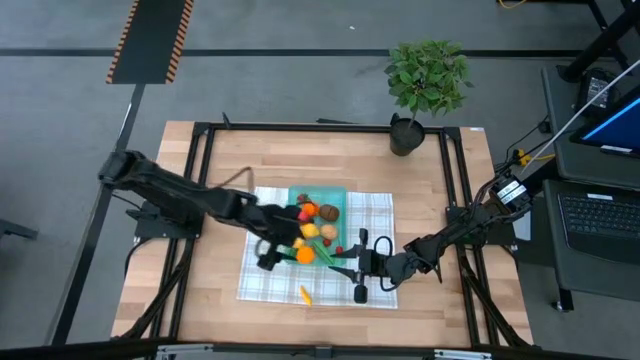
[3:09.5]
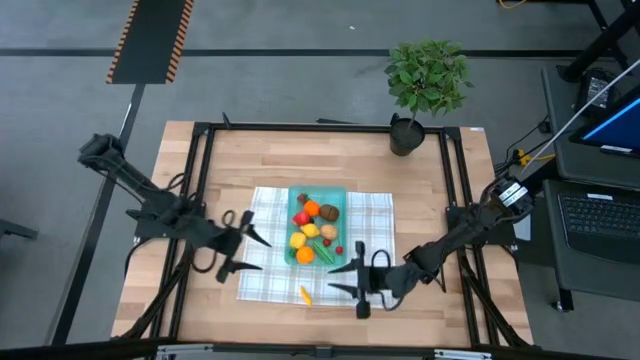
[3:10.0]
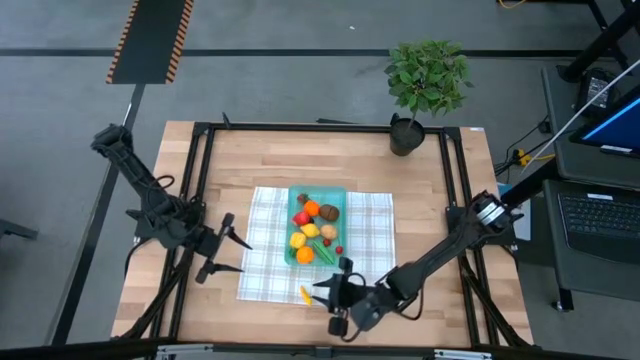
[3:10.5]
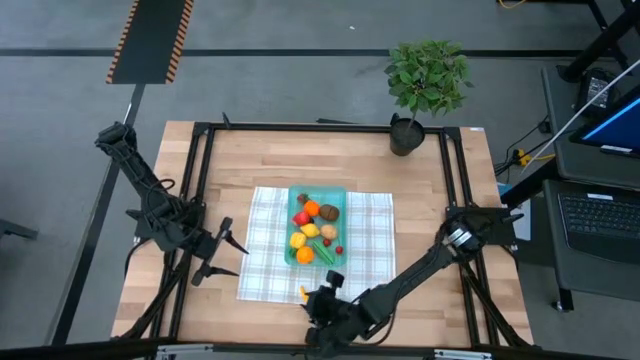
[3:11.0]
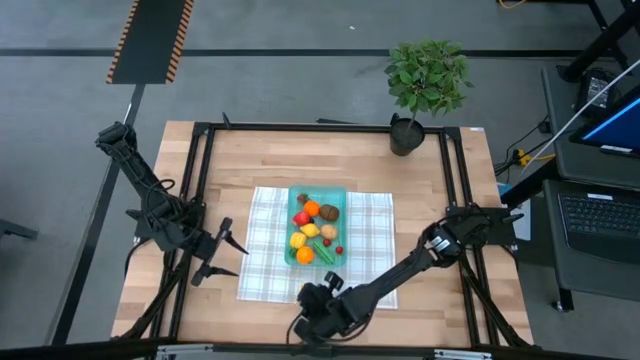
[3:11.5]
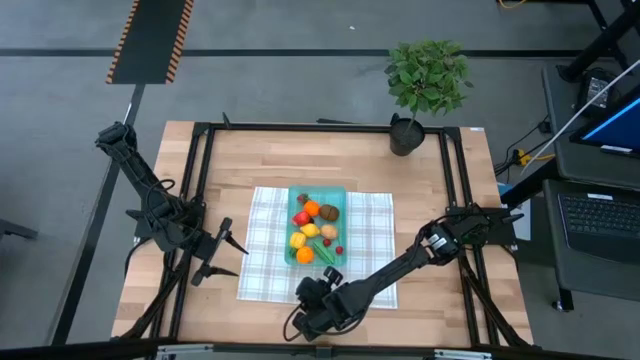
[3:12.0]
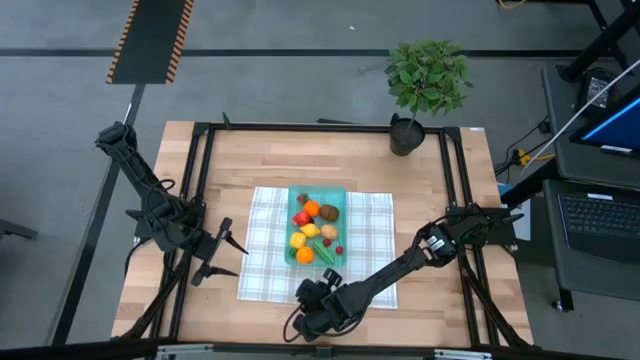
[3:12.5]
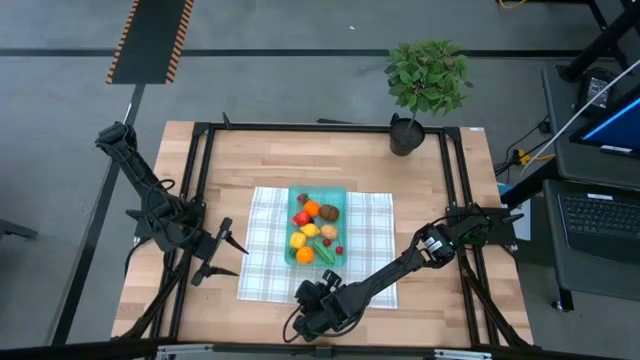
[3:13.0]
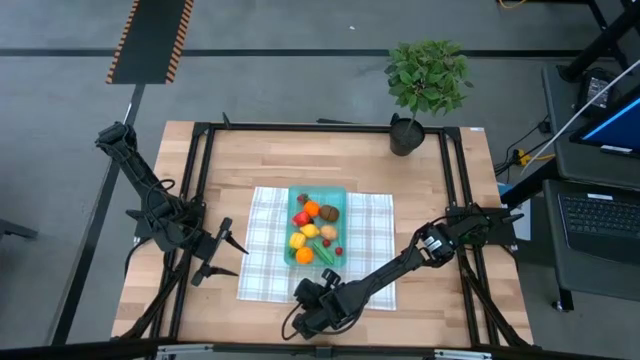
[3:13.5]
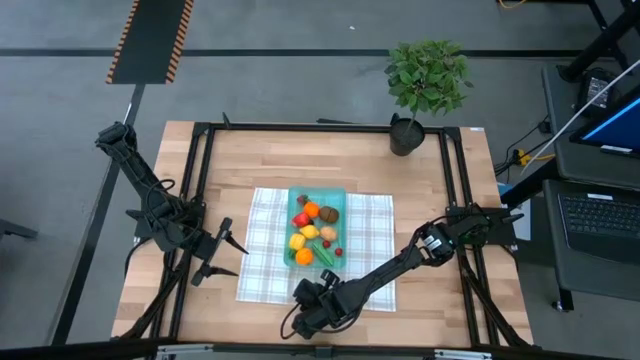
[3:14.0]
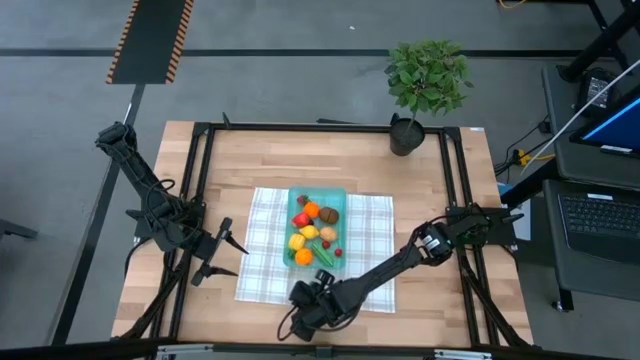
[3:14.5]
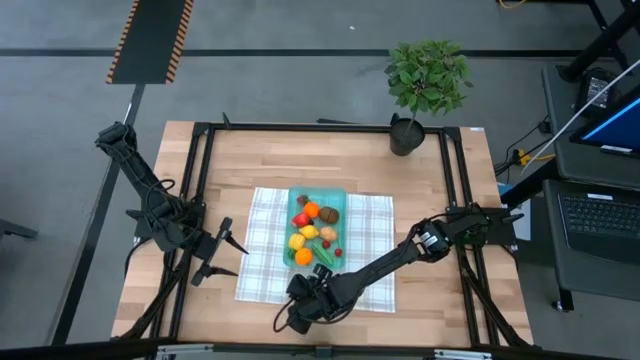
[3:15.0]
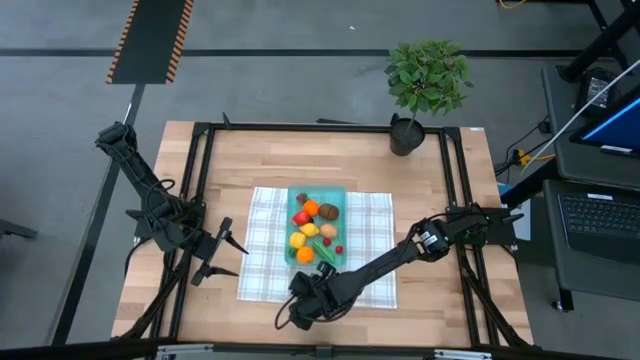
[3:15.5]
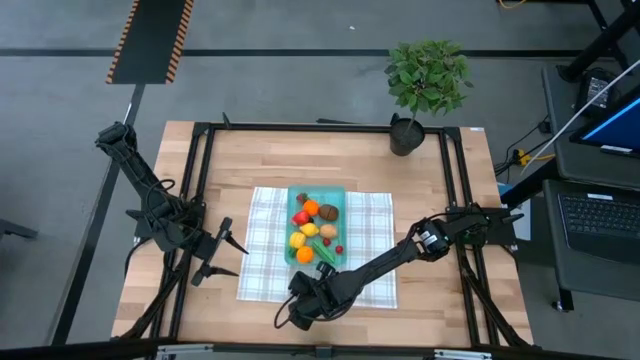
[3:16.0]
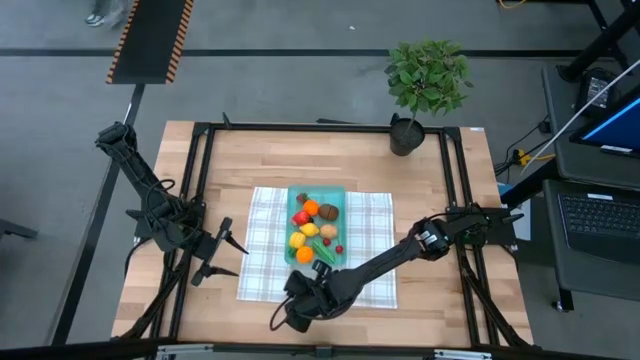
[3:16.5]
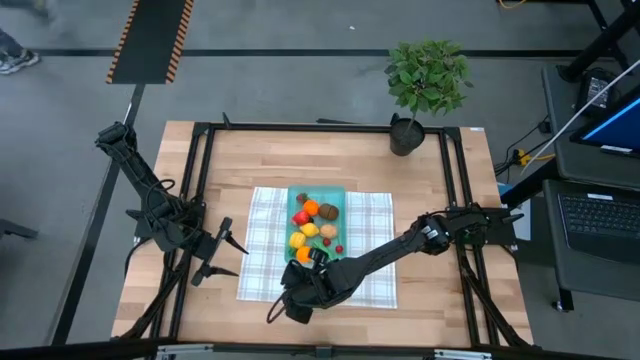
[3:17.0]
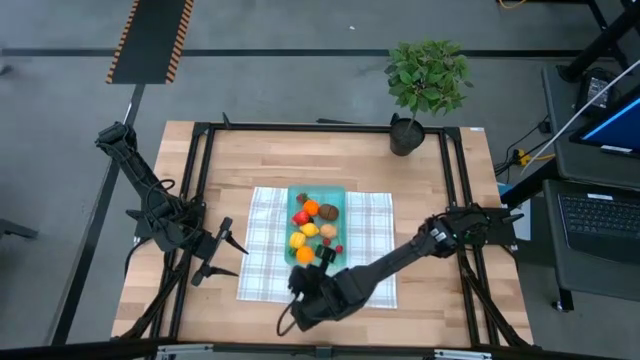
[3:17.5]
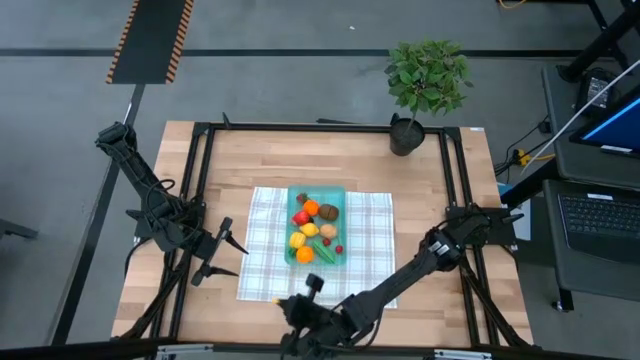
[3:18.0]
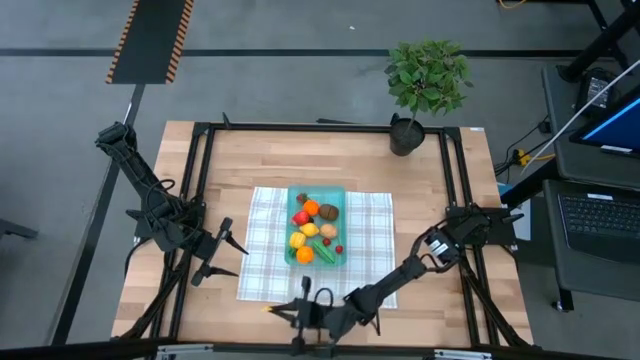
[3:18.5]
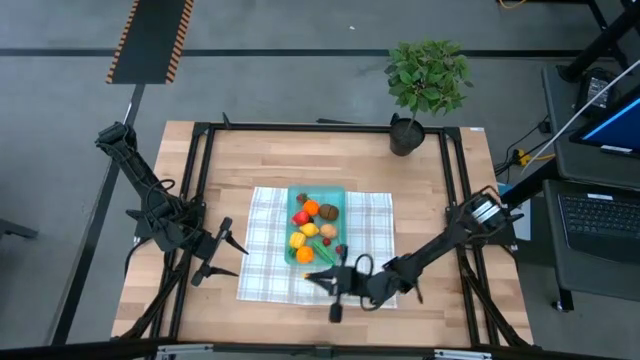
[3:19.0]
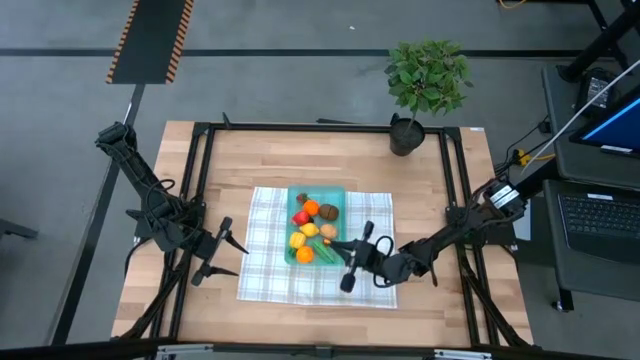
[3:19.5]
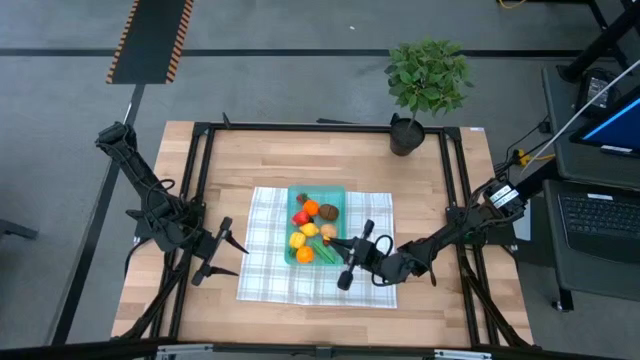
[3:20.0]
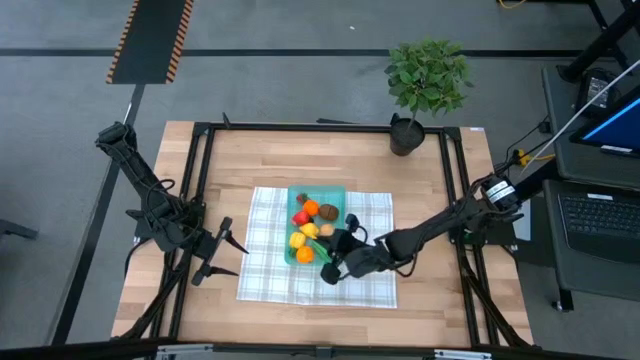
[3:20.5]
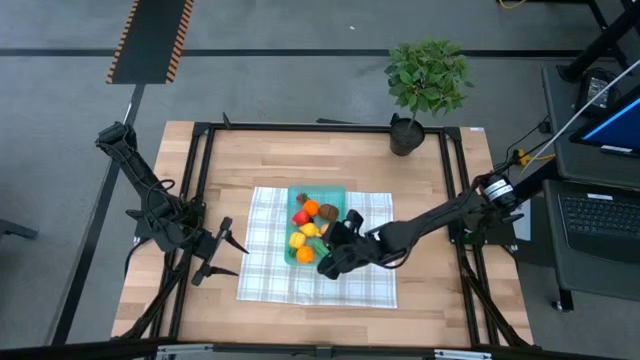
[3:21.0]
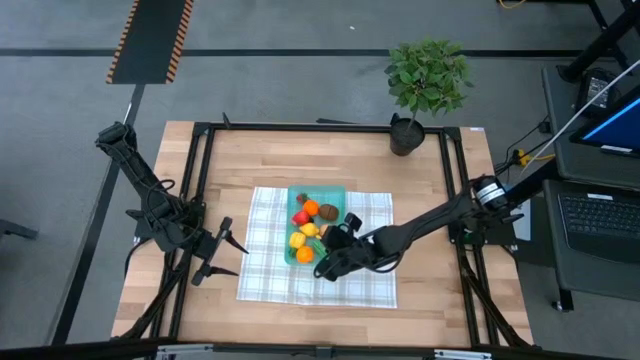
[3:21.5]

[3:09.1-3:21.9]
Task: Pick and placing Produce into tupperware
Put the yellow corn into the blue bin

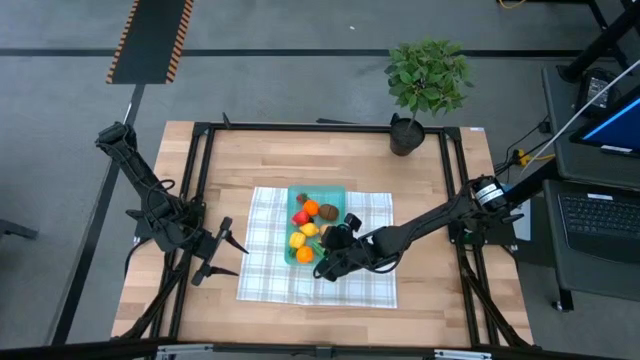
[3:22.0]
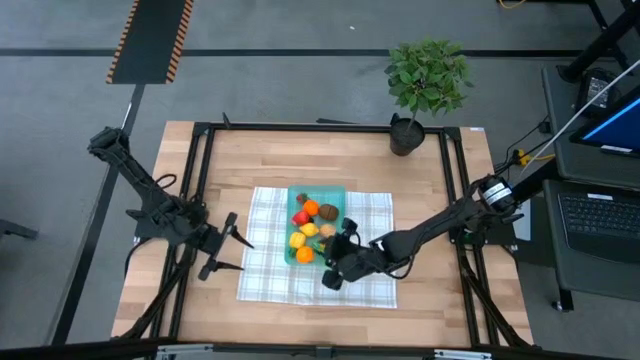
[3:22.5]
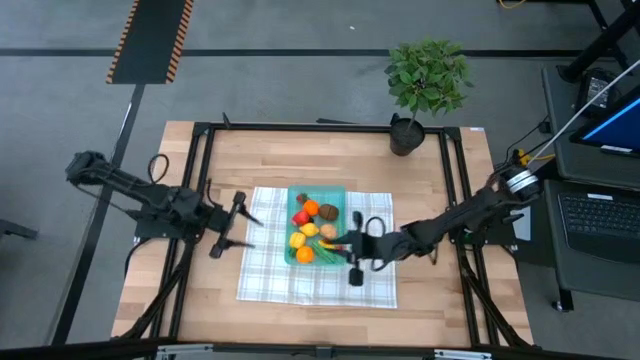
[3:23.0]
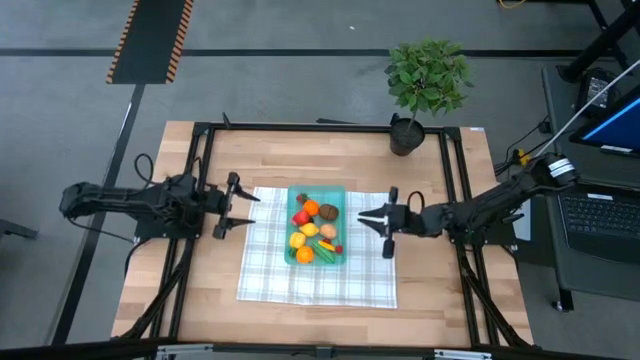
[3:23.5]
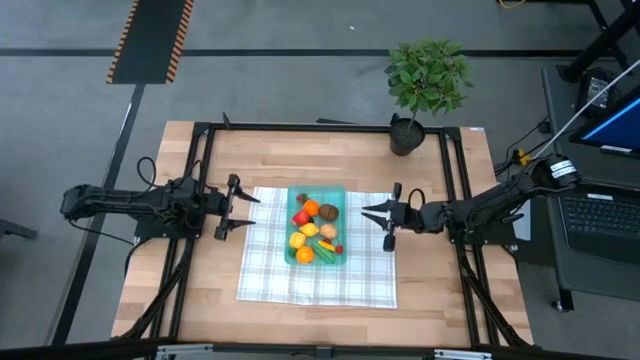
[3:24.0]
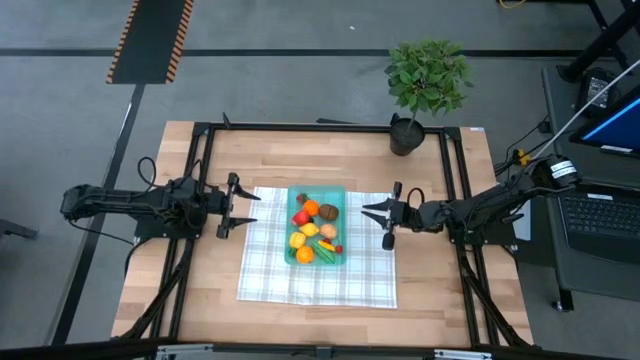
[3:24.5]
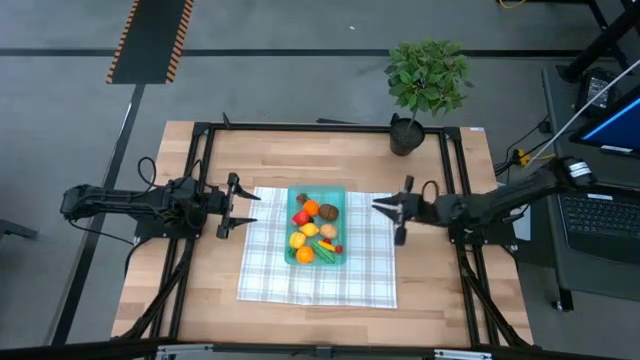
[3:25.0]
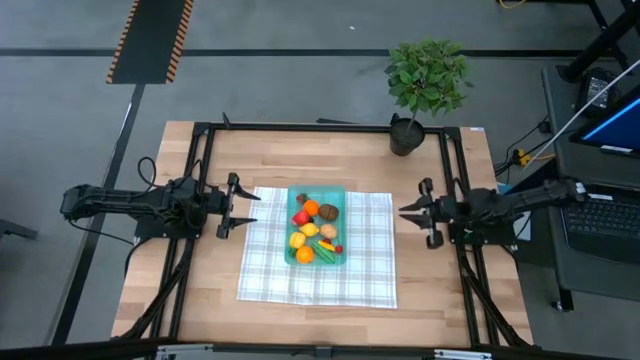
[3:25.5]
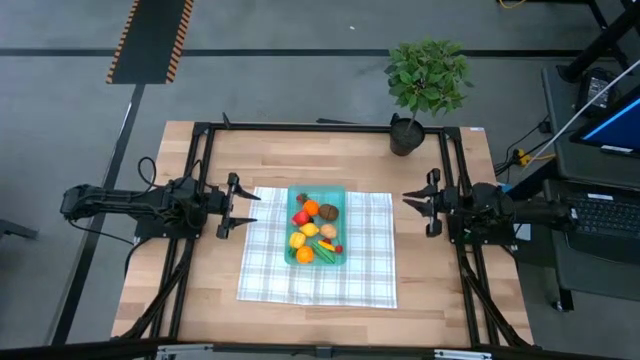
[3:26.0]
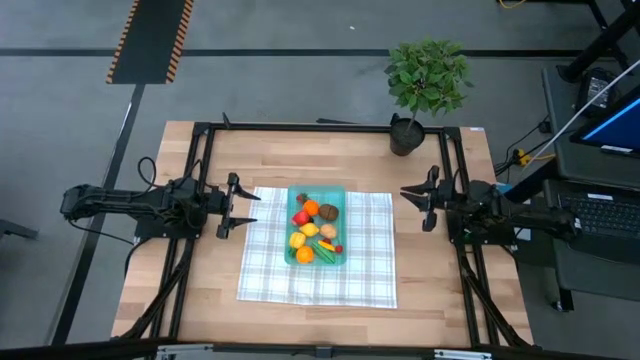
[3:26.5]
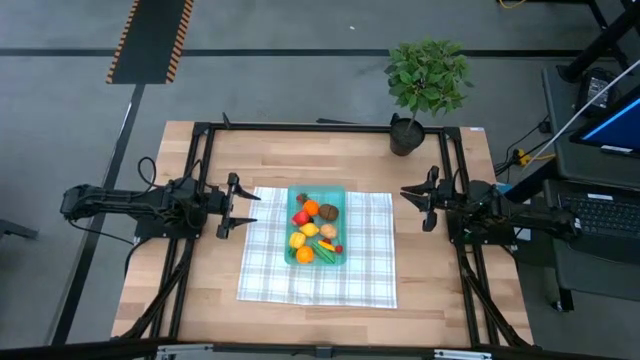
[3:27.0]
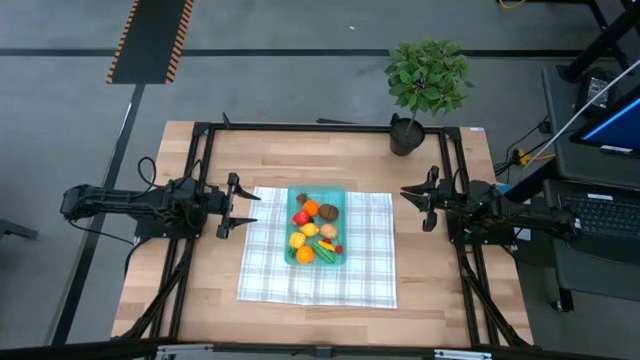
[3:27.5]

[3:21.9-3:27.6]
Return to Home Position
